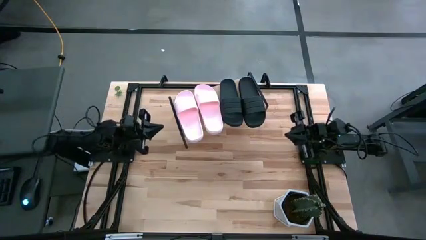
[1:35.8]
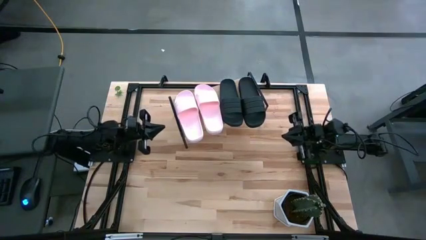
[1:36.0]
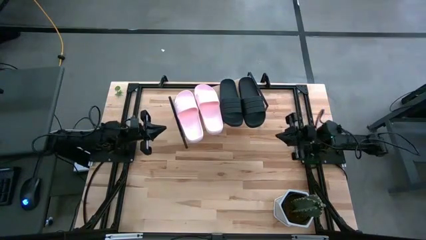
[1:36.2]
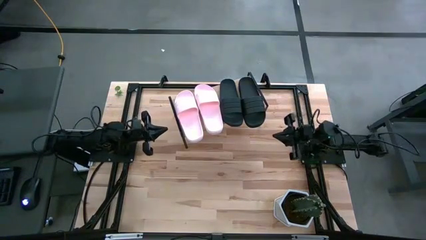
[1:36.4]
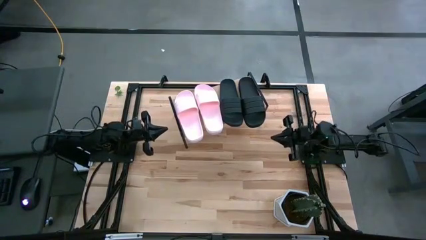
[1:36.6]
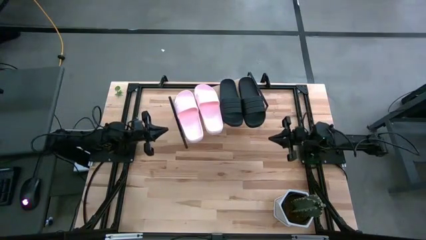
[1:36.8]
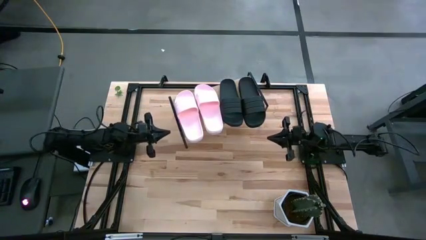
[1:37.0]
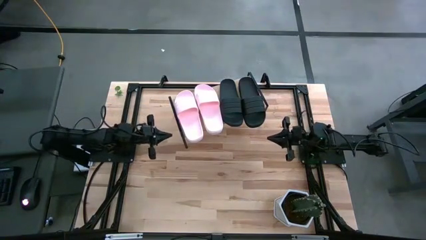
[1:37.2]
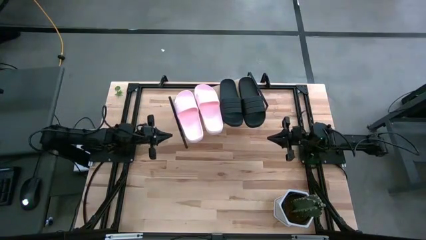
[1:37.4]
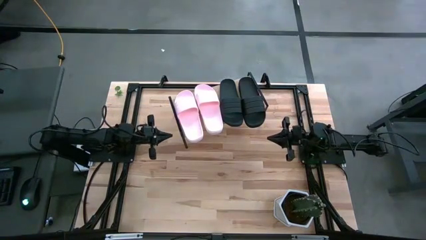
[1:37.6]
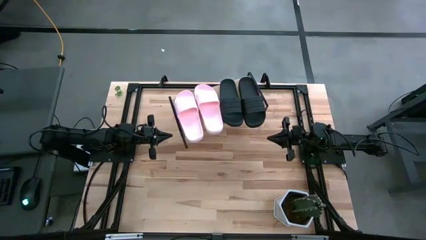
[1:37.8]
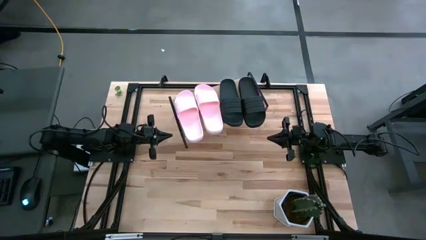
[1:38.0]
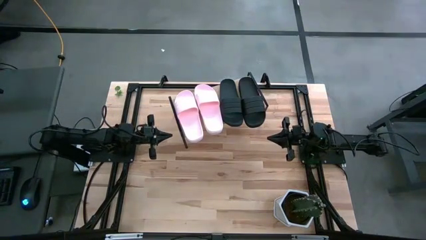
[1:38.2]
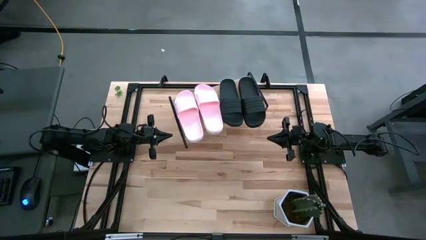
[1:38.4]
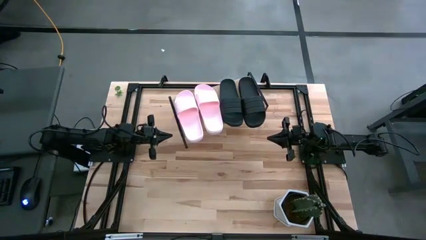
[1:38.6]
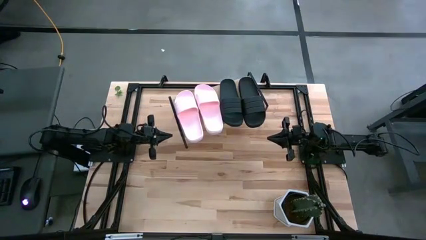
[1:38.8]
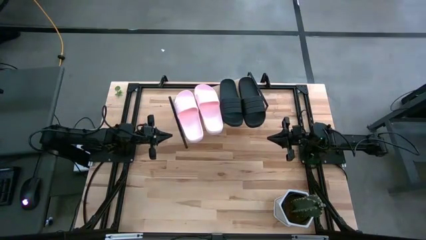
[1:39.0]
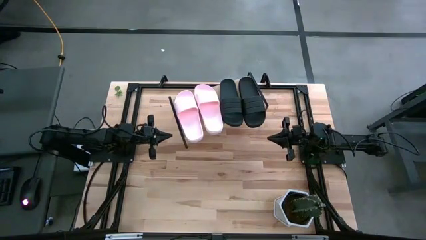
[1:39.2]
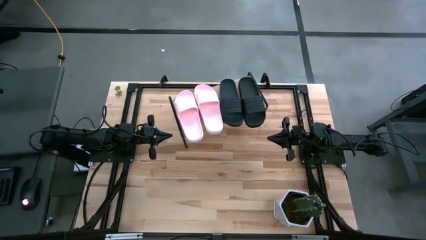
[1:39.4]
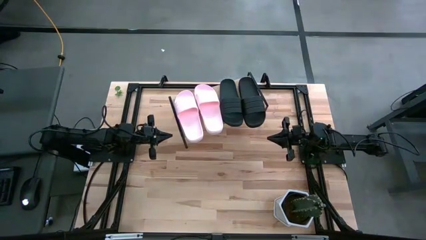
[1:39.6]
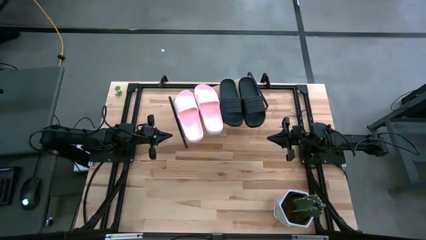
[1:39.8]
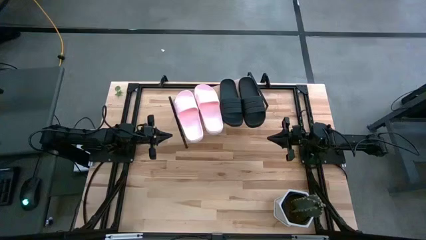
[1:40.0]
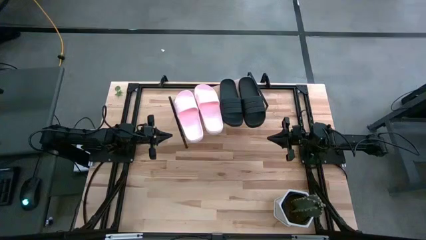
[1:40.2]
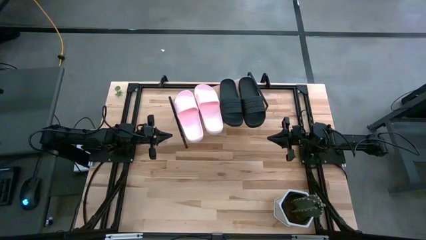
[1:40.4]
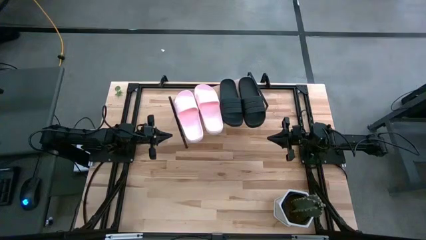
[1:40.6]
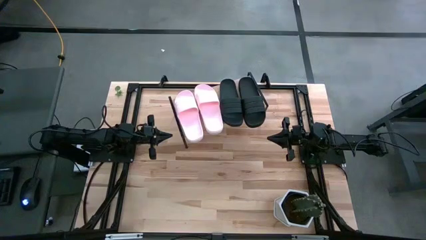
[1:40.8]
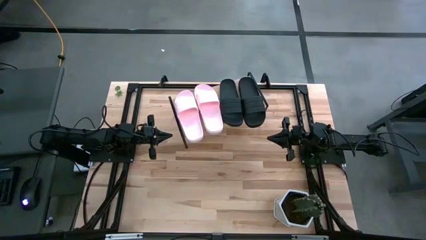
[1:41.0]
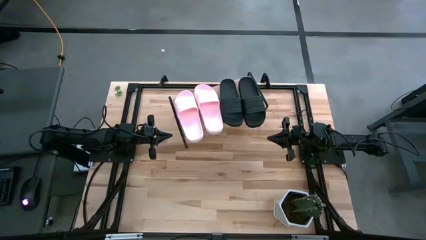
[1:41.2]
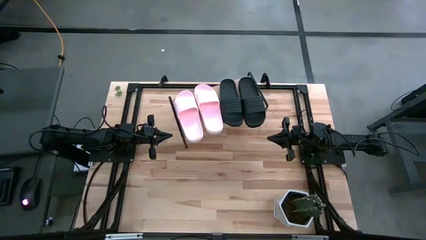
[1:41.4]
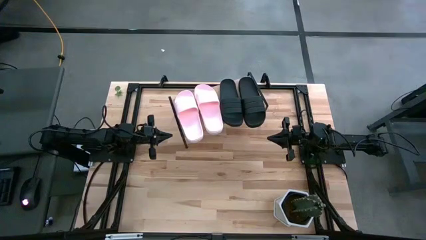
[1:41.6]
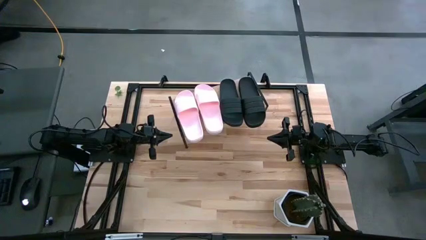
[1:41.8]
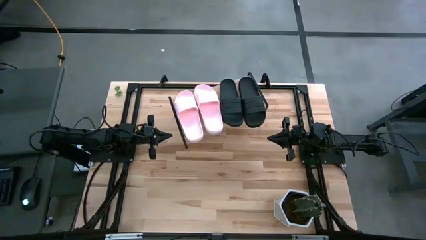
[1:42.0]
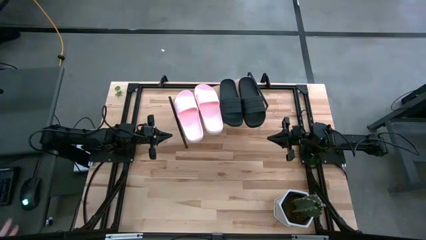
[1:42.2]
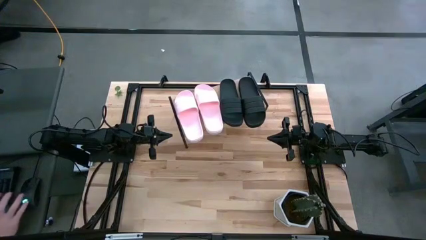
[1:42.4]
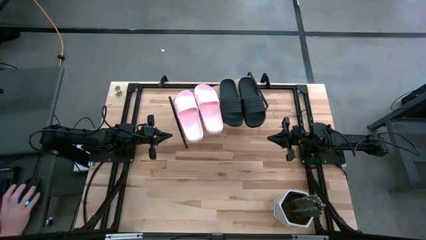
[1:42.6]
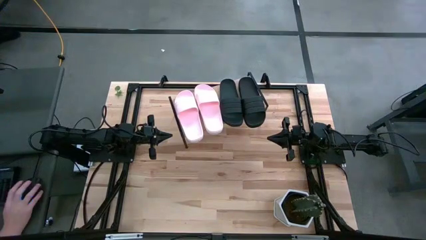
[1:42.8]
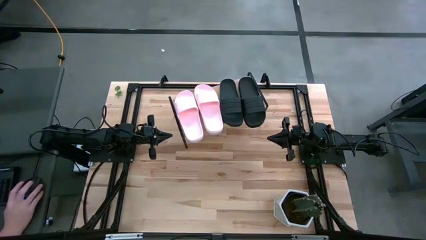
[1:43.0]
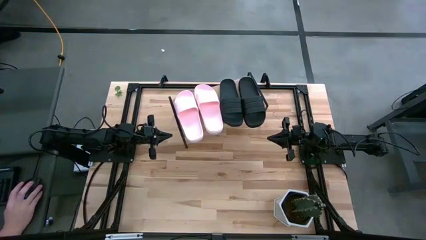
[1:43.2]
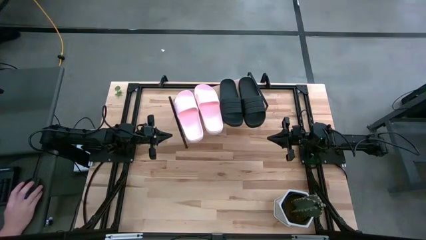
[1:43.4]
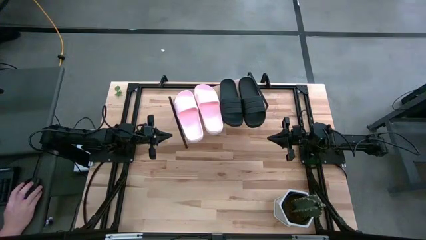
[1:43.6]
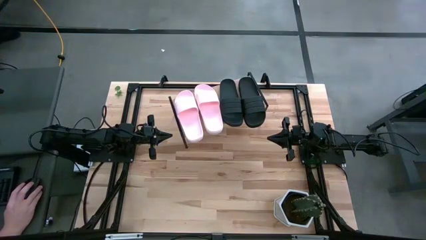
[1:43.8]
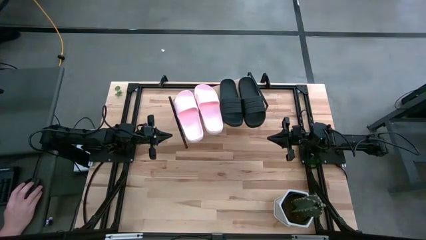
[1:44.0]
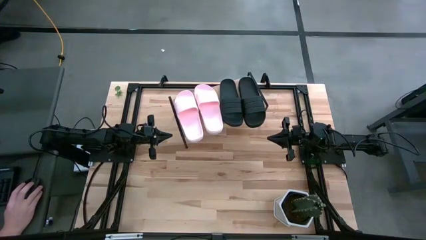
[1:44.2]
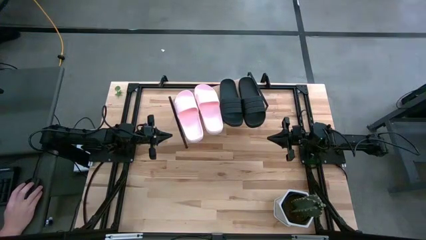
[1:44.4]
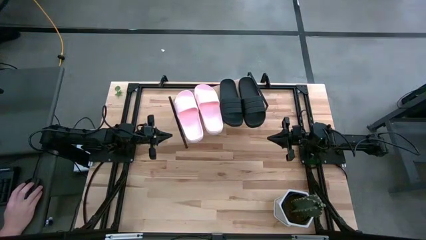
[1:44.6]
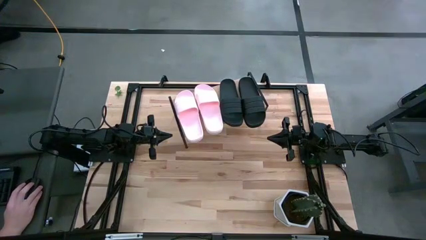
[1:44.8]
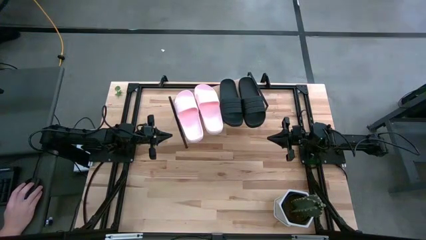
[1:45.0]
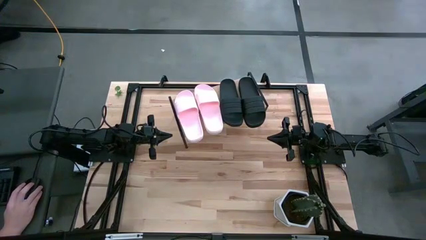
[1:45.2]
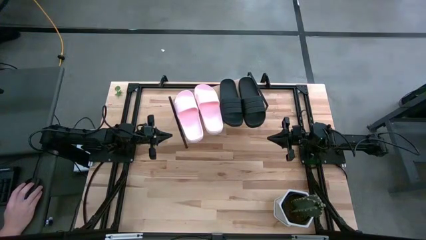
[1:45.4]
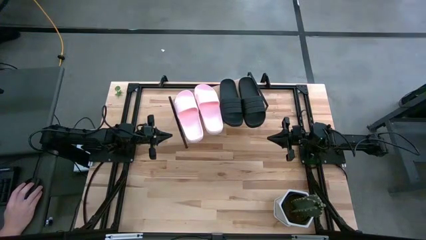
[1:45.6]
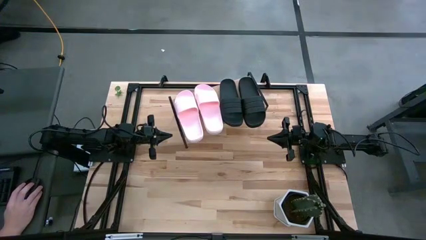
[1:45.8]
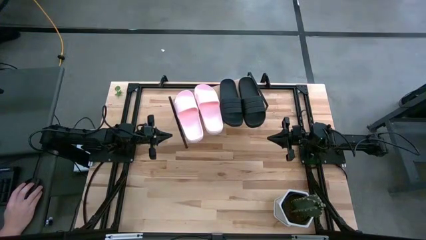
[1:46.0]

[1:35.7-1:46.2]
Task: Pick and place slides into the shelf
Return to Home Position

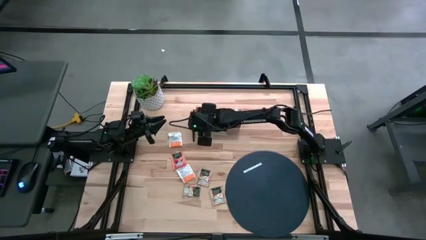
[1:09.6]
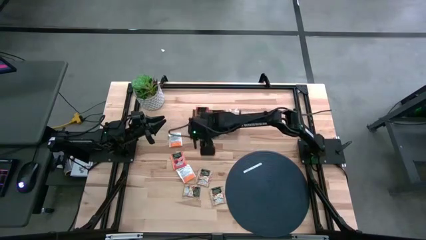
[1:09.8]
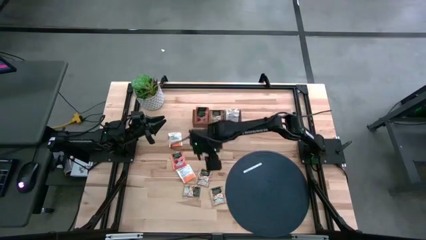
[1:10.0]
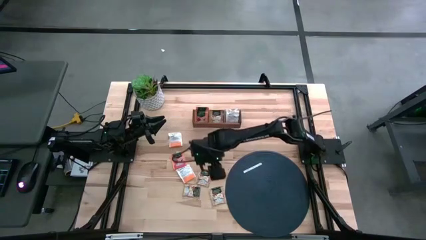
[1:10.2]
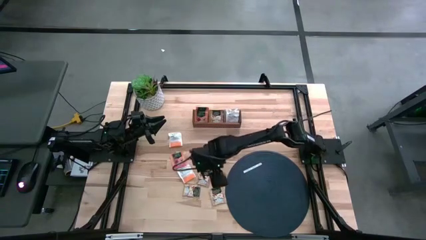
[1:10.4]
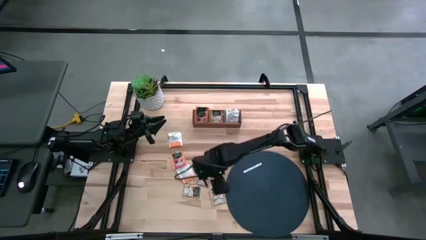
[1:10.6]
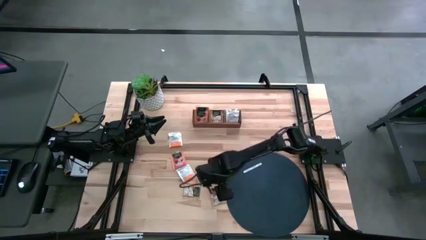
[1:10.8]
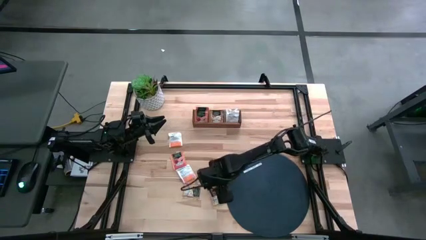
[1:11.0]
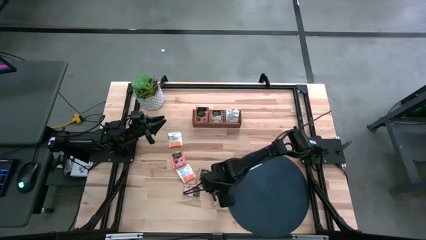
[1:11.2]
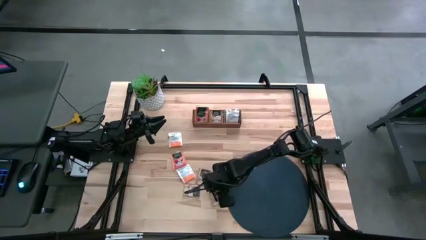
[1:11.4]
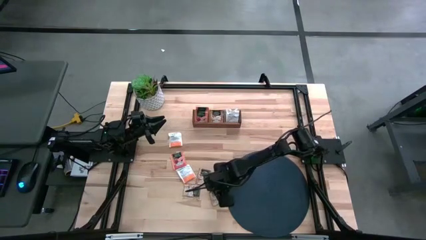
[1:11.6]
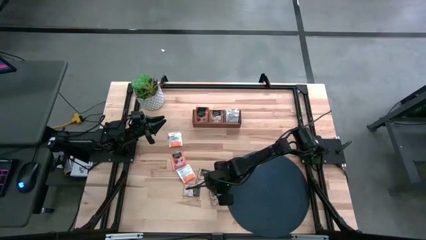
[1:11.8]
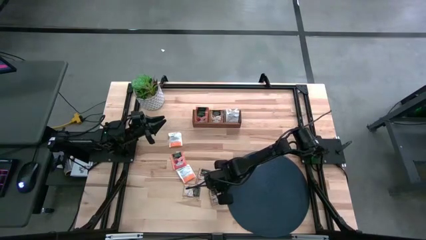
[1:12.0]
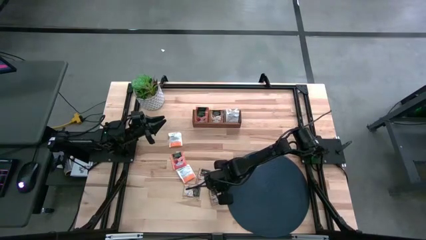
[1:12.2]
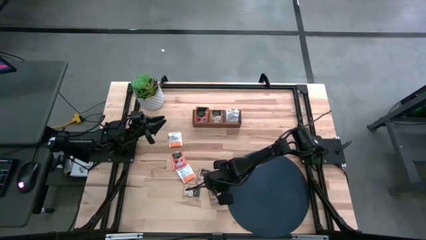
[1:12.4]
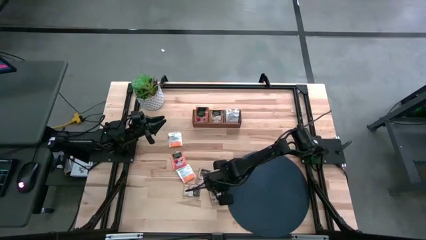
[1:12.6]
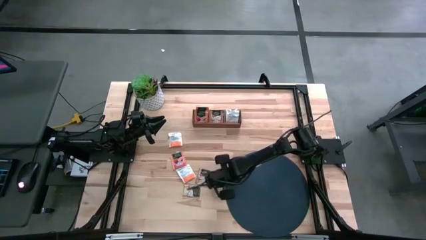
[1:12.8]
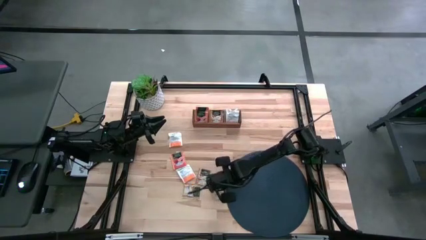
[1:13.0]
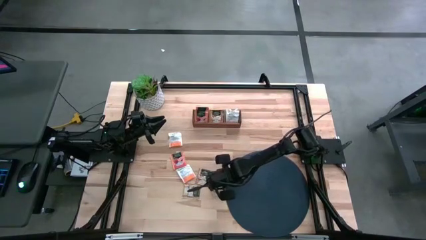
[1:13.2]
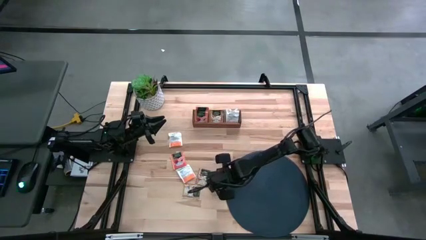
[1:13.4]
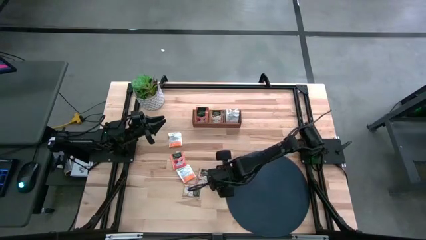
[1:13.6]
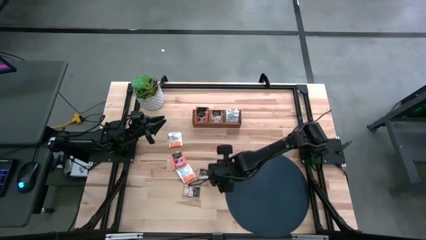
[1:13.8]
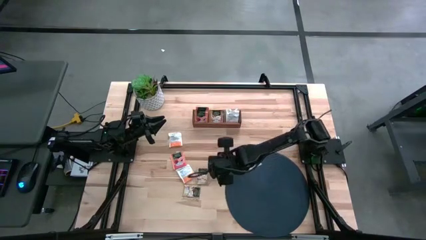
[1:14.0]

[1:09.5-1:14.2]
Task: Pick & Place Tea
Put the brown tea sachet into the middle section of the wooden organizer

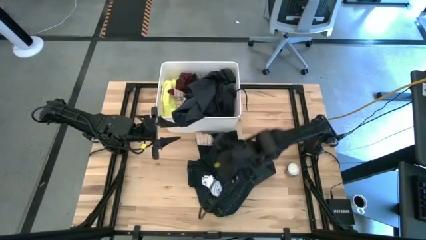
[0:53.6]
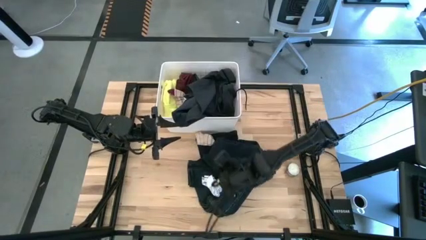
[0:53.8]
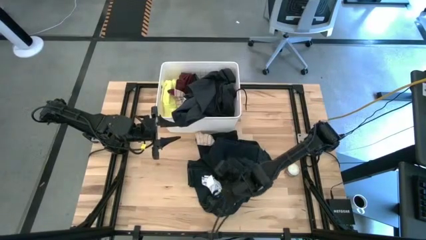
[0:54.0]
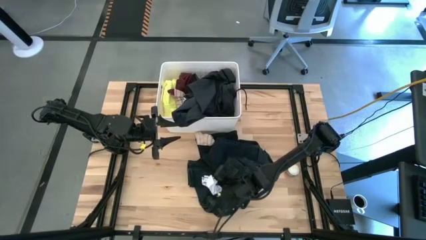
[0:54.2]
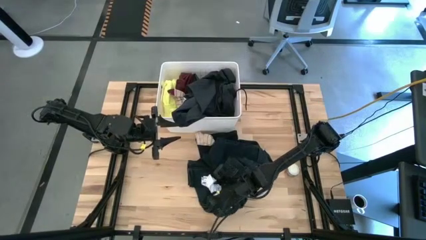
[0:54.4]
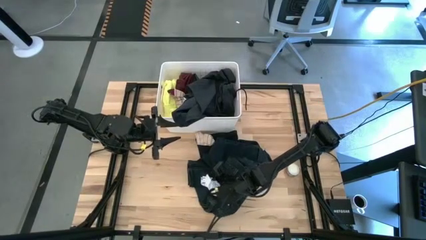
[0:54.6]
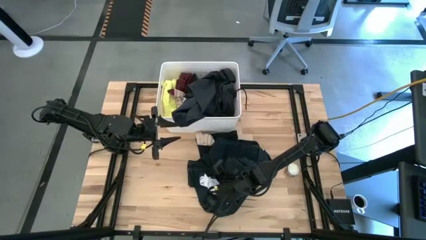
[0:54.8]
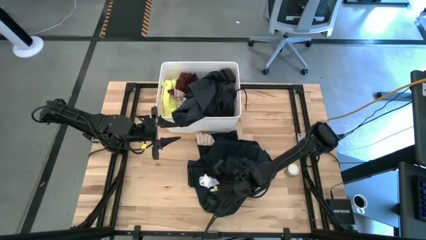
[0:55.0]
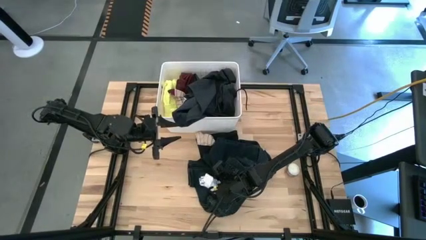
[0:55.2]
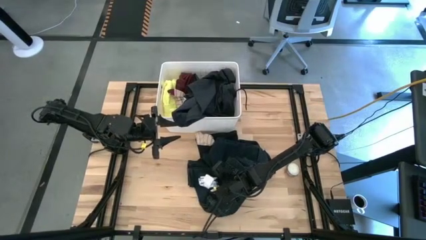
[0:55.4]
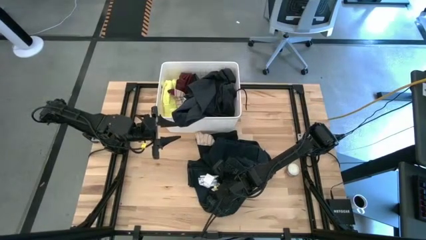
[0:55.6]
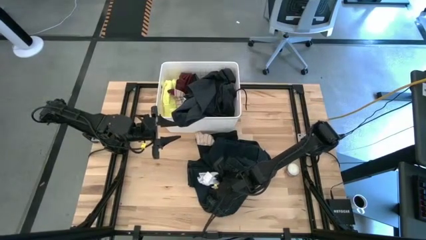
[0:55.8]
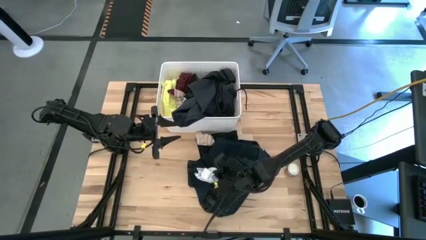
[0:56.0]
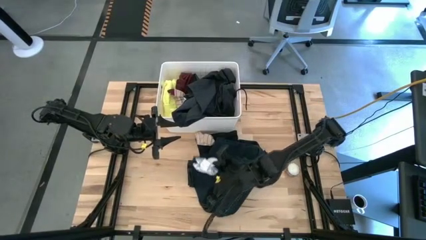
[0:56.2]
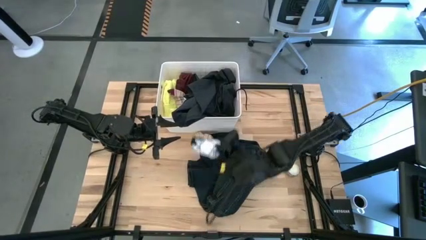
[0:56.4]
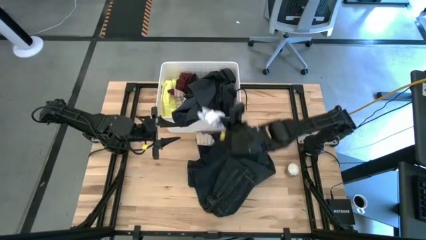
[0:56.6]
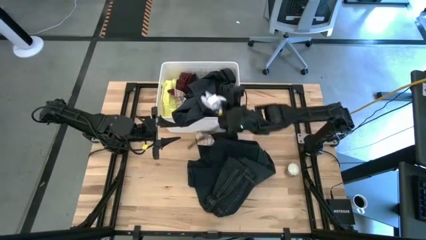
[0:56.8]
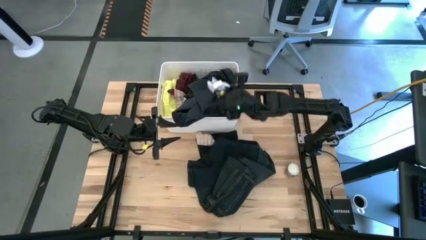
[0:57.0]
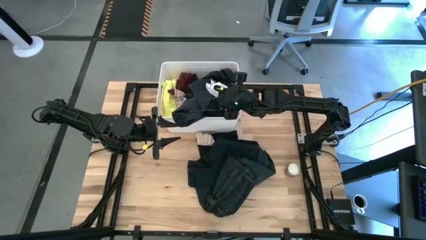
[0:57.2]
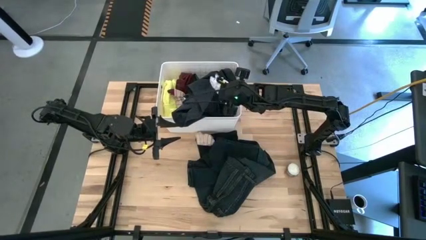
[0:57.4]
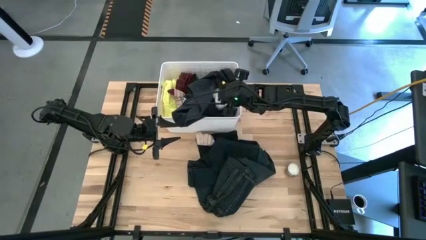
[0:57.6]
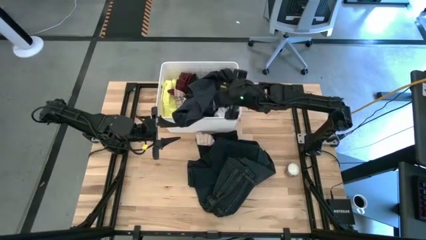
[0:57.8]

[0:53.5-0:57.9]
Task: Sort clothes
Put the blue sock into the white laundry organizer
